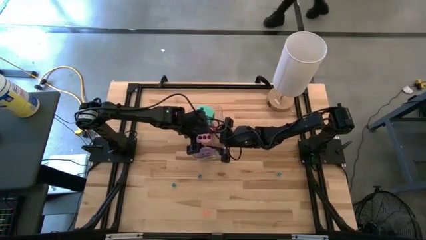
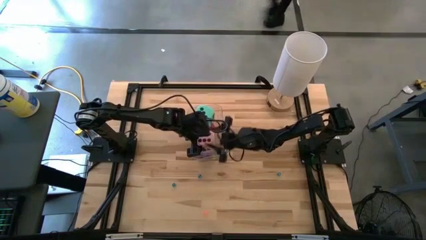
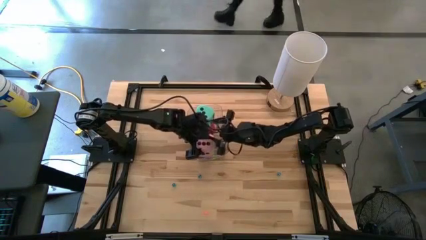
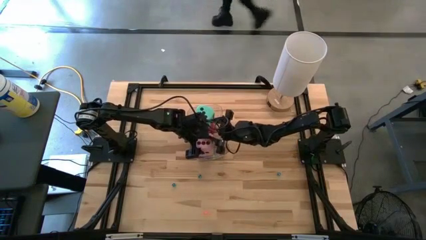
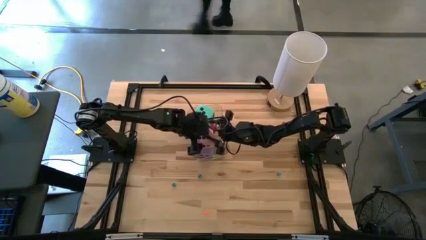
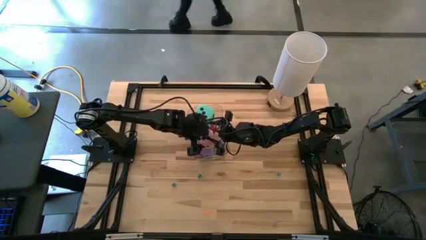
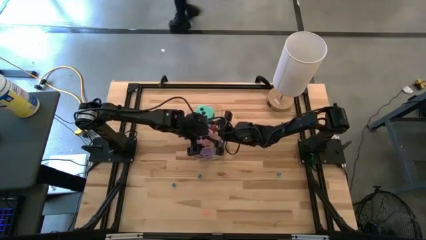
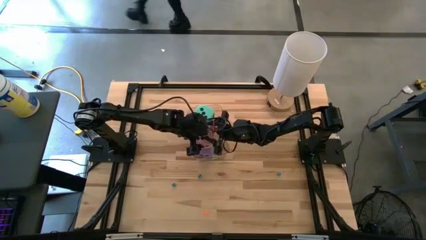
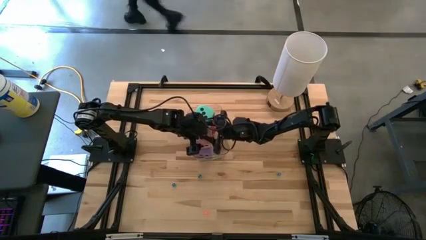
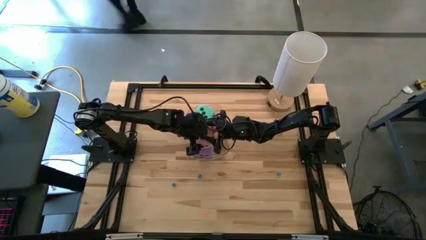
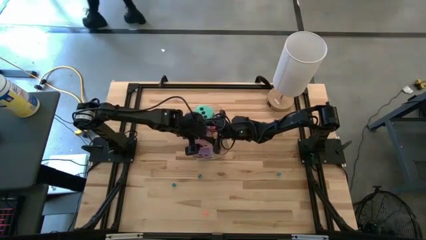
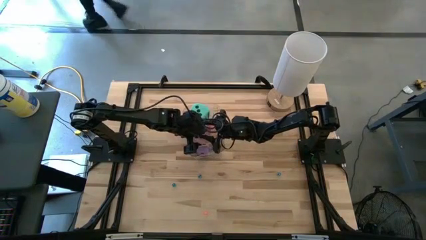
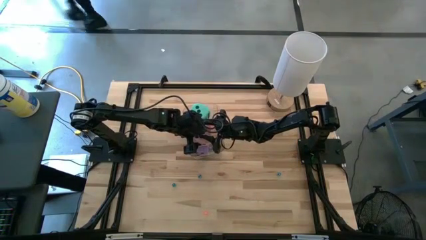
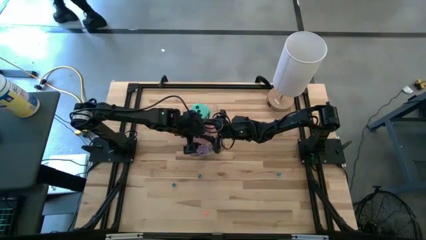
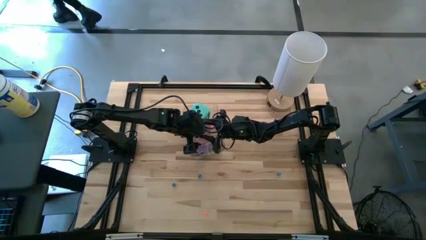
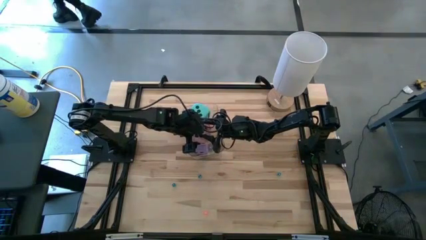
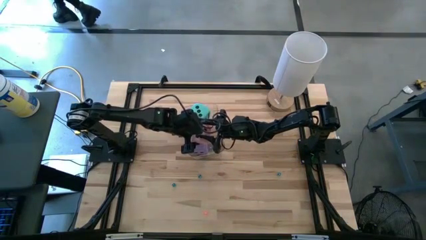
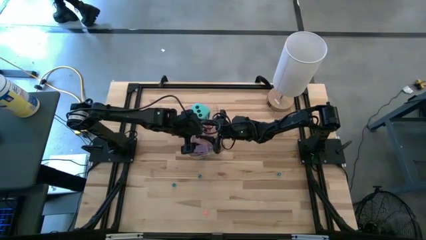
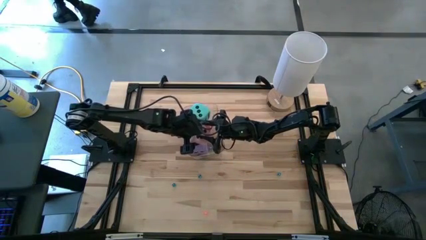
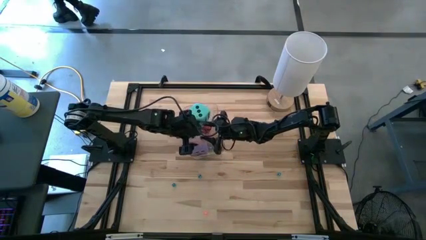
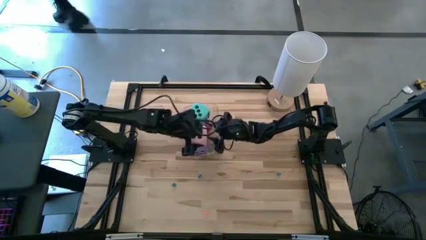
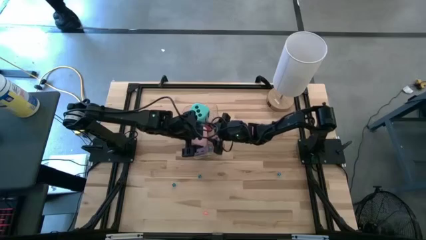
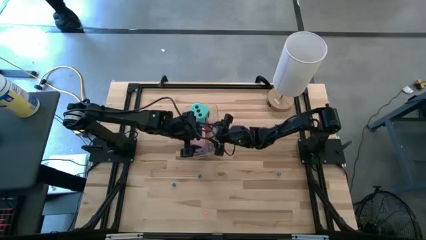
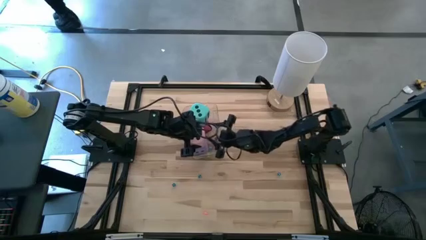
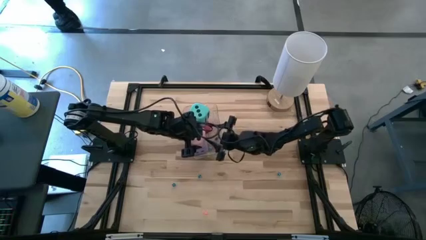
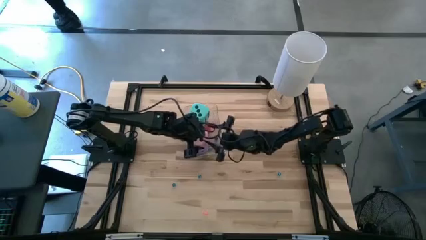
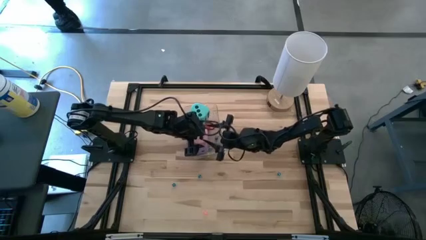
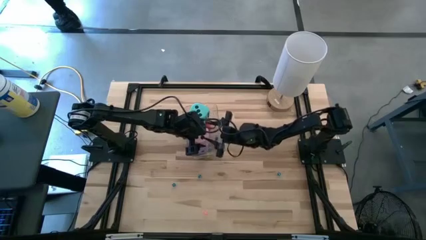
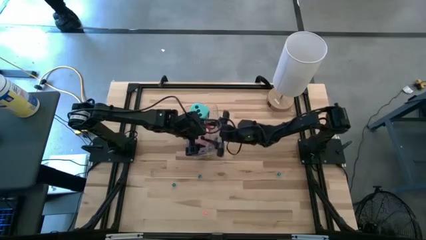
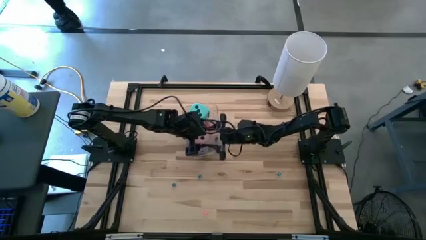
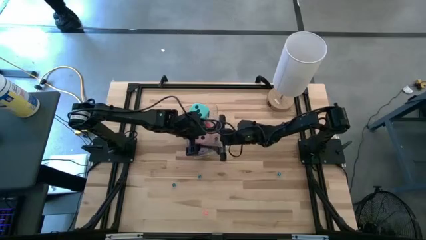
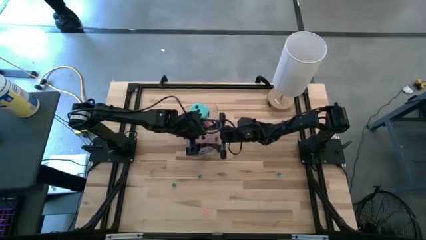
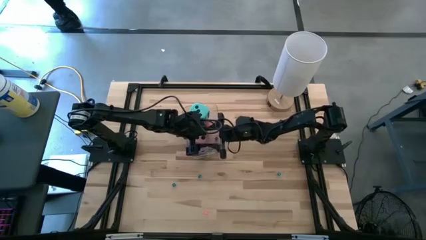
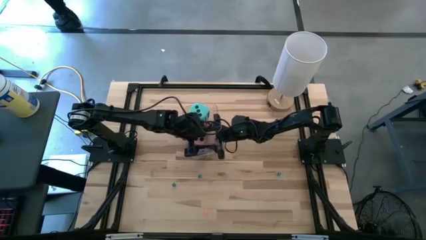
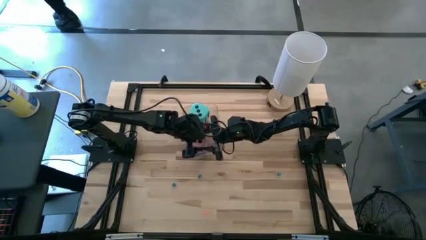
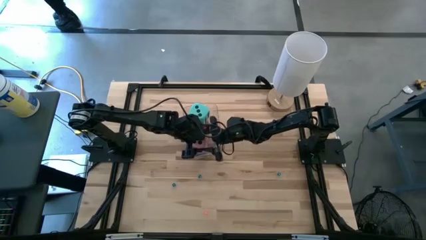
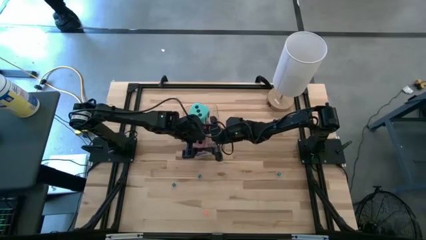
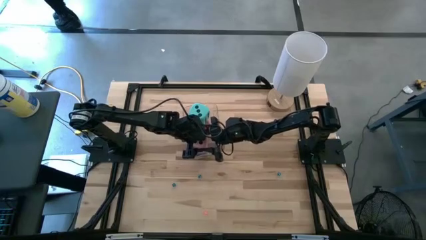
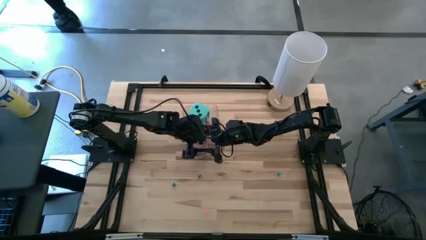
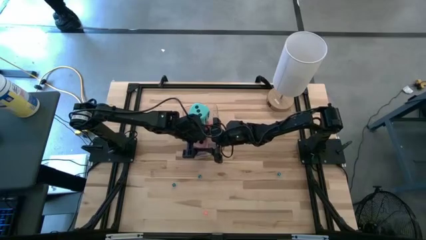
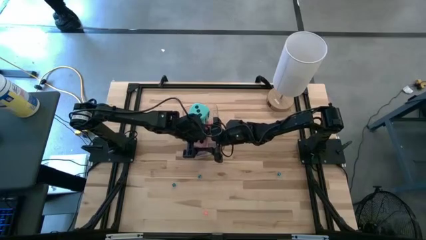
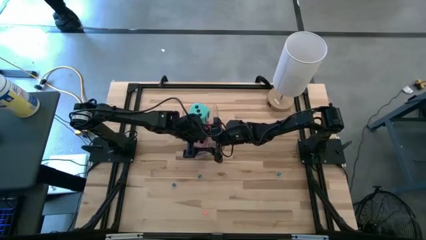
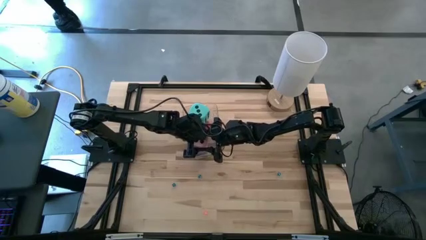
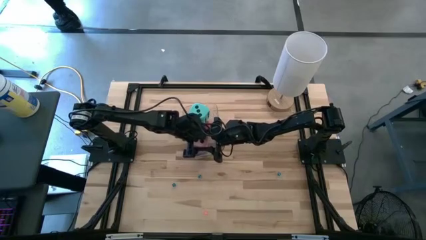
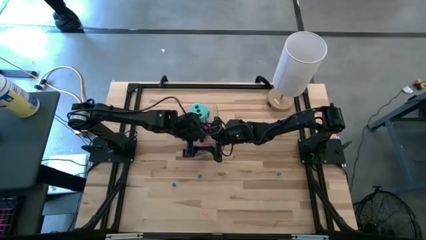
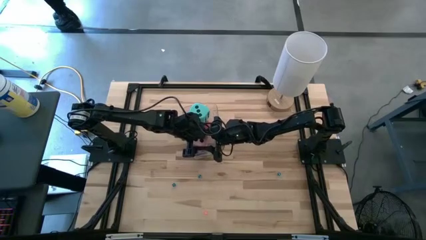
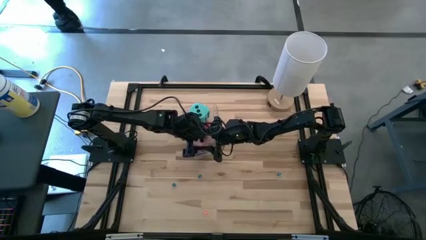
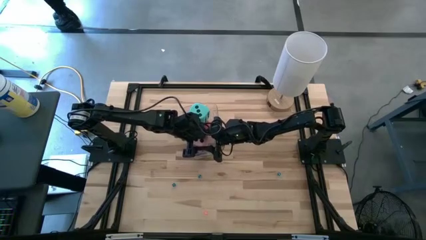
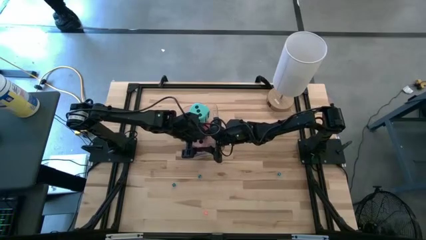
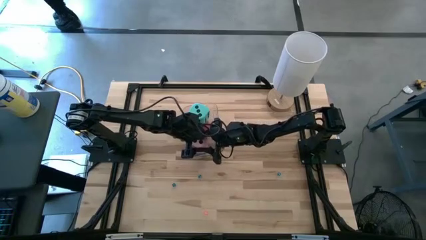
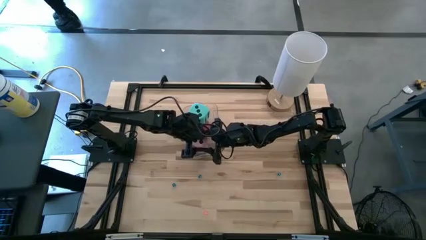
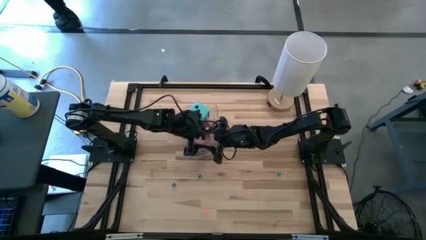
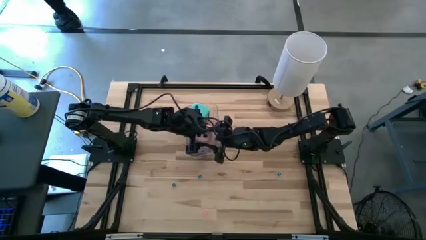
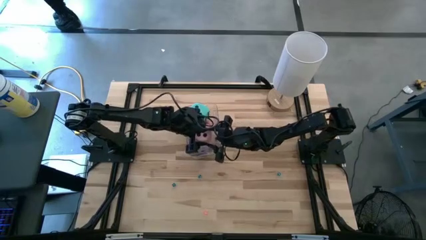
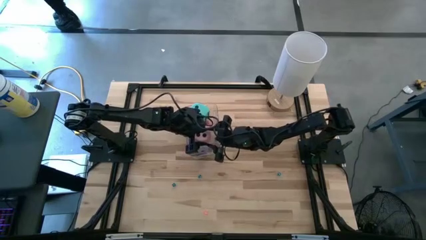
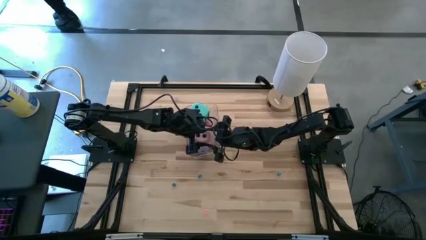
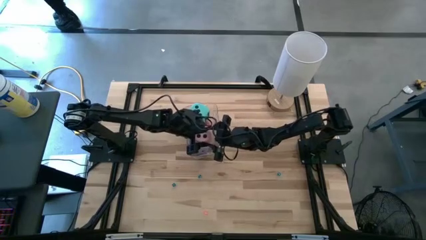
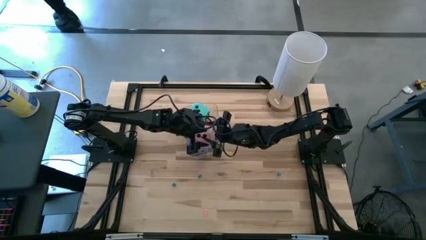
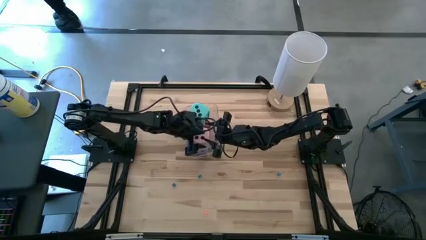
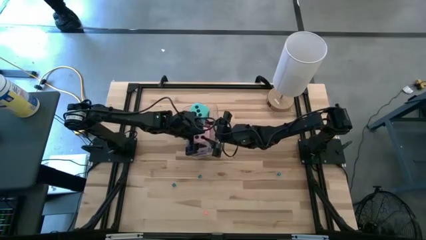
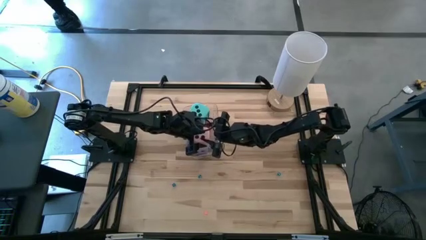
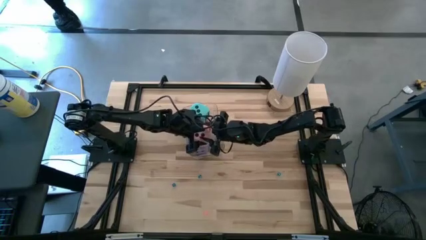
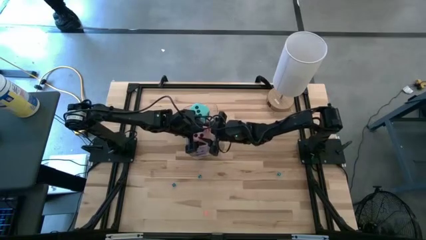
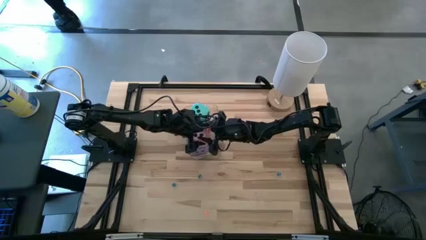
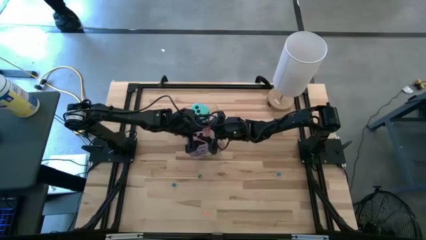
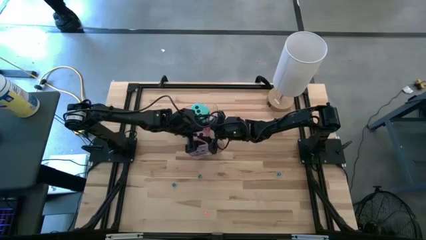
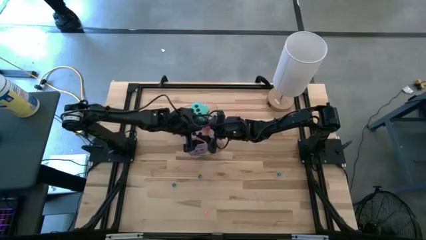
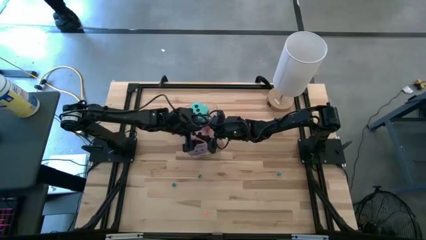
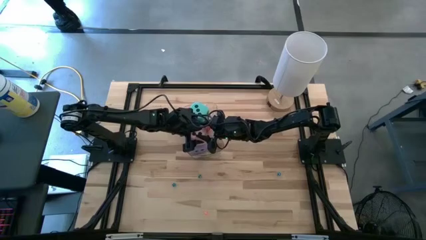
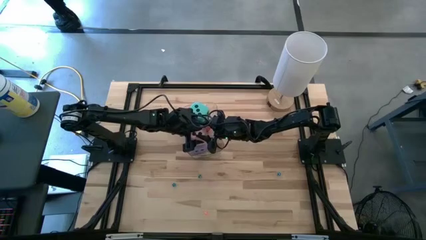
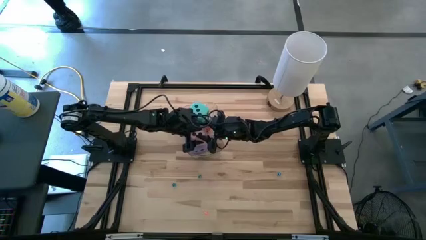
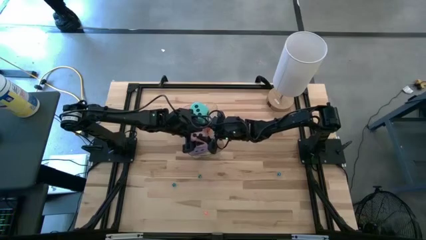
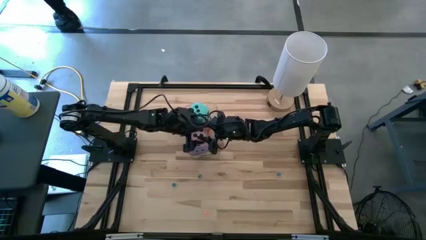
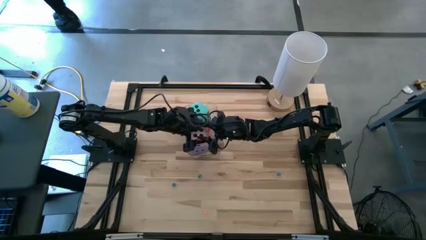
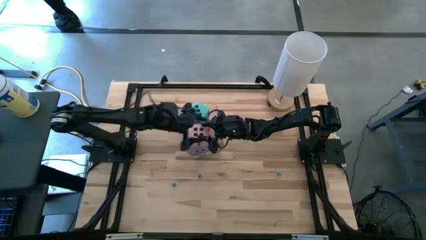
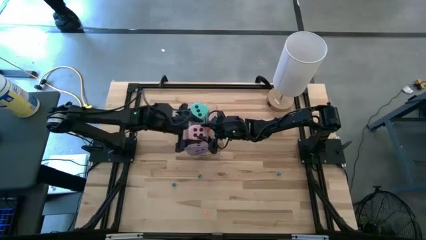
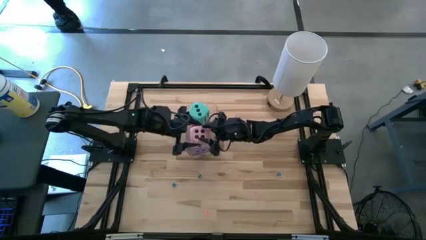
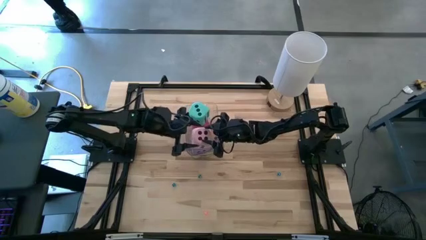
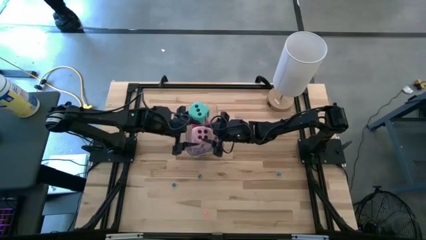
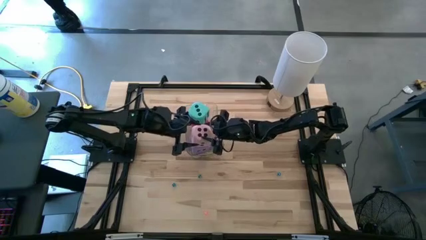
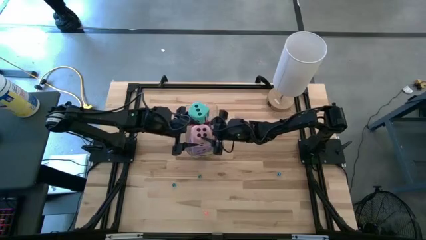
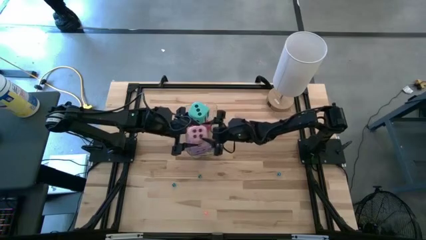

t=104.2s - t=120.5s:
Task: Pick & Place Dice
Put the large pink die into the transparent bin
